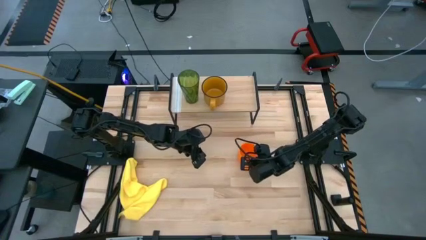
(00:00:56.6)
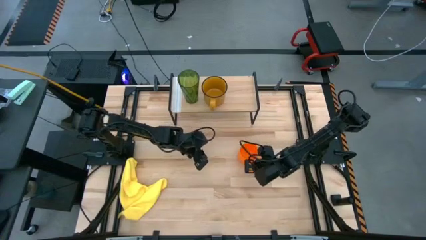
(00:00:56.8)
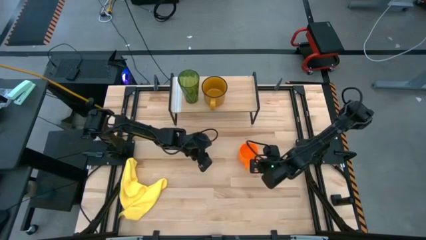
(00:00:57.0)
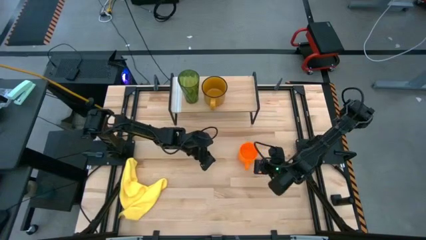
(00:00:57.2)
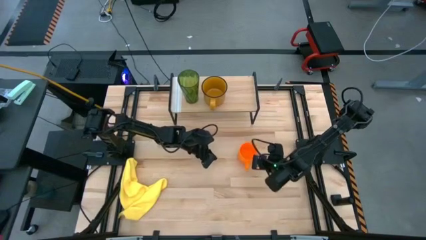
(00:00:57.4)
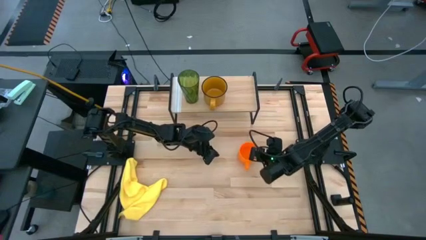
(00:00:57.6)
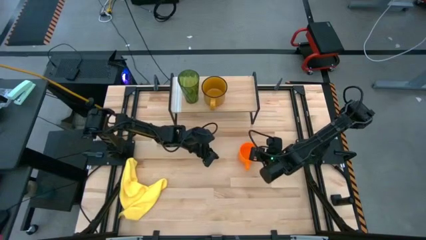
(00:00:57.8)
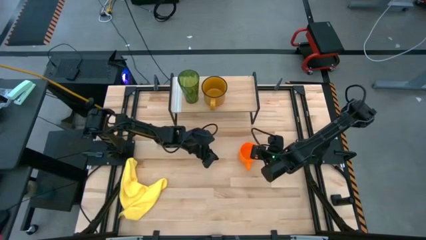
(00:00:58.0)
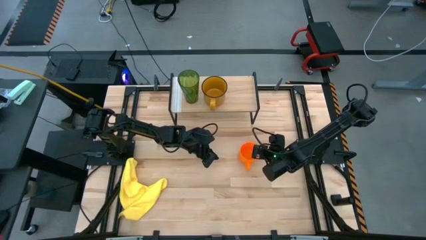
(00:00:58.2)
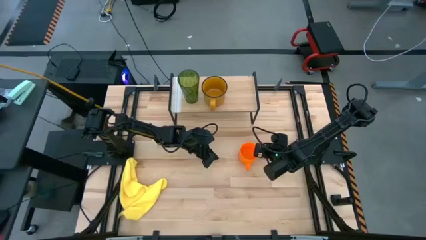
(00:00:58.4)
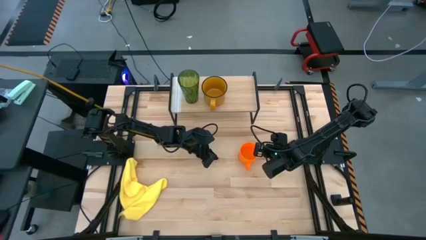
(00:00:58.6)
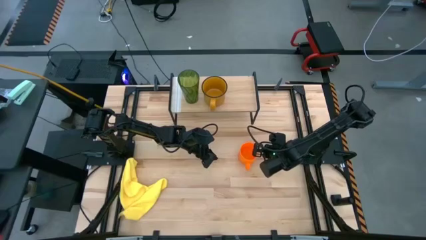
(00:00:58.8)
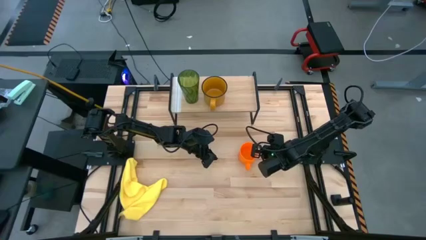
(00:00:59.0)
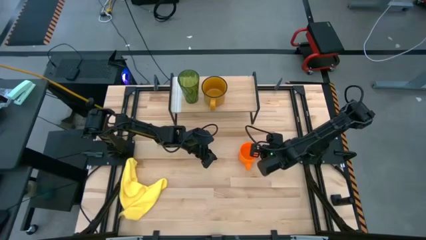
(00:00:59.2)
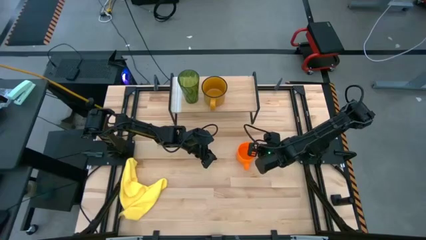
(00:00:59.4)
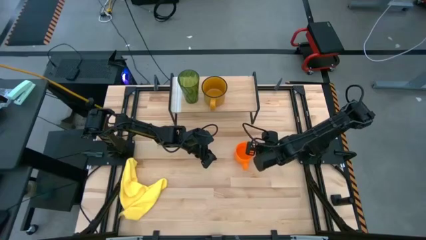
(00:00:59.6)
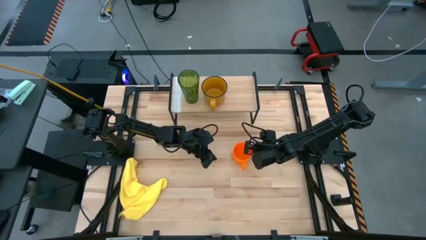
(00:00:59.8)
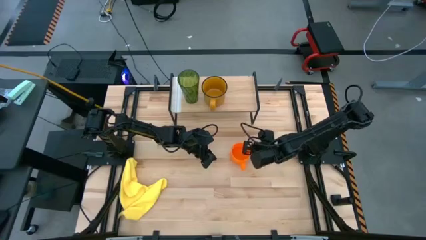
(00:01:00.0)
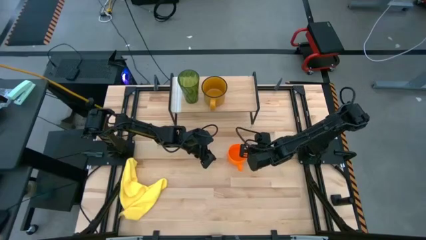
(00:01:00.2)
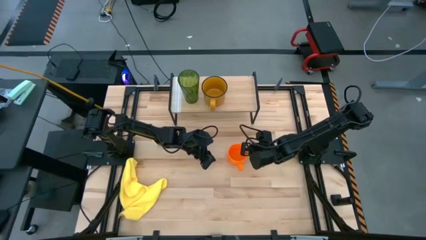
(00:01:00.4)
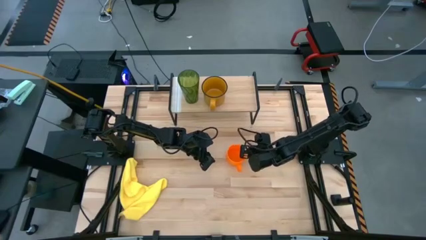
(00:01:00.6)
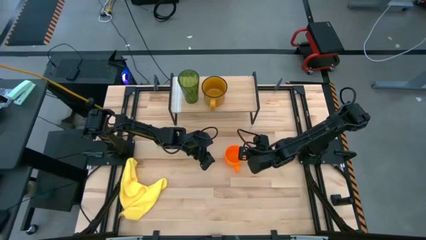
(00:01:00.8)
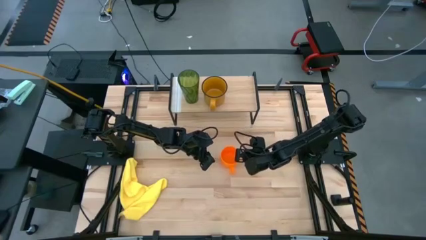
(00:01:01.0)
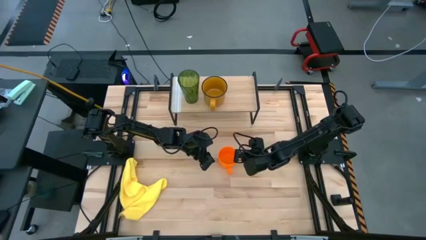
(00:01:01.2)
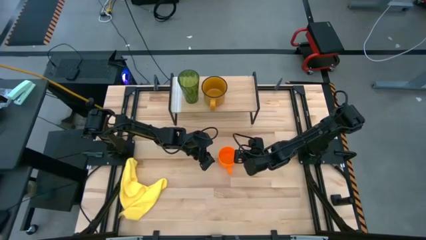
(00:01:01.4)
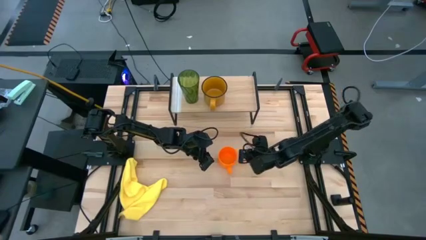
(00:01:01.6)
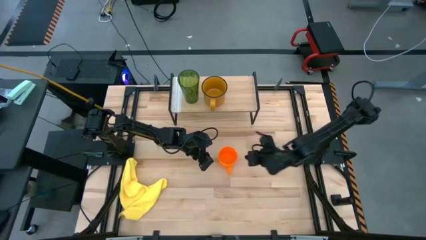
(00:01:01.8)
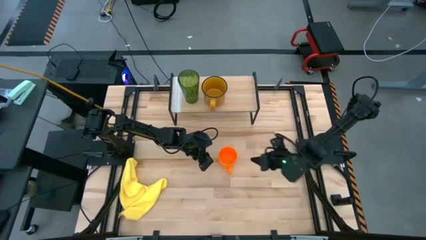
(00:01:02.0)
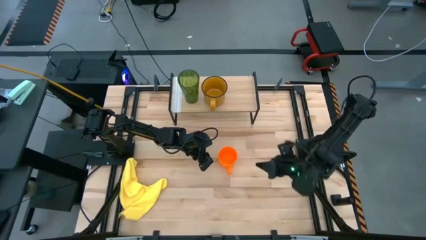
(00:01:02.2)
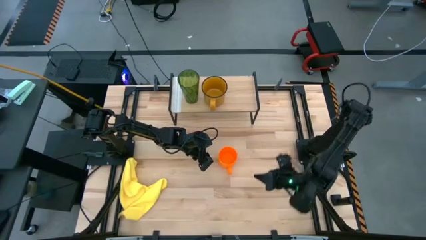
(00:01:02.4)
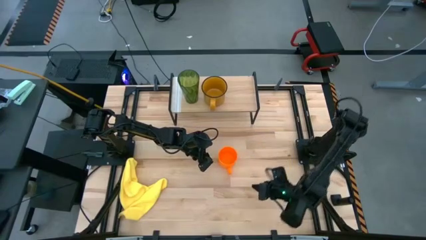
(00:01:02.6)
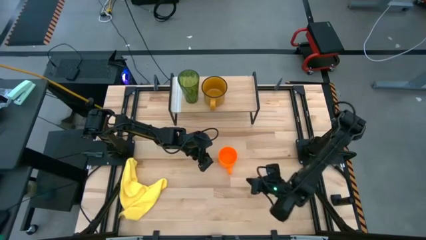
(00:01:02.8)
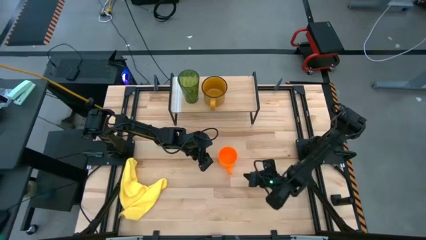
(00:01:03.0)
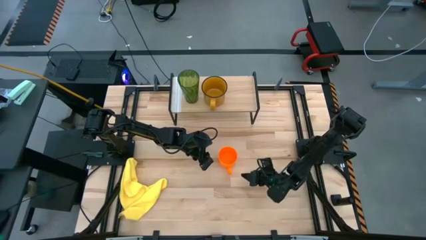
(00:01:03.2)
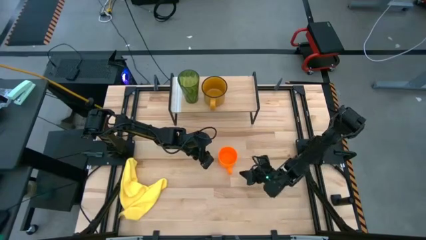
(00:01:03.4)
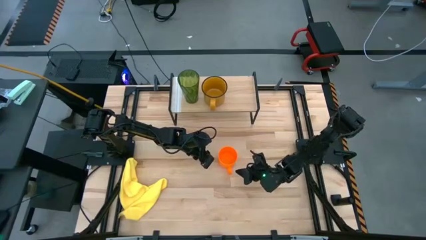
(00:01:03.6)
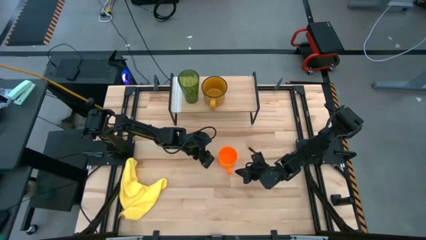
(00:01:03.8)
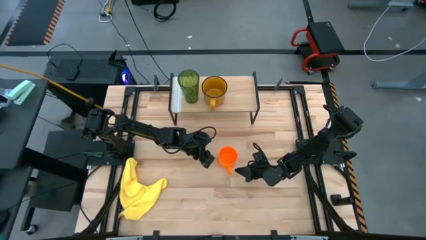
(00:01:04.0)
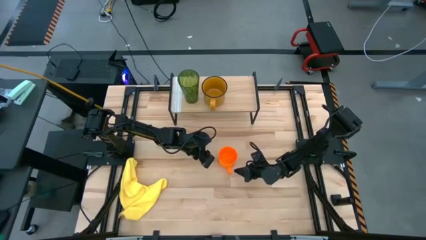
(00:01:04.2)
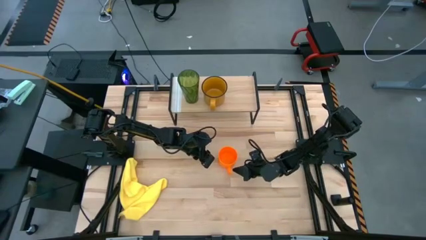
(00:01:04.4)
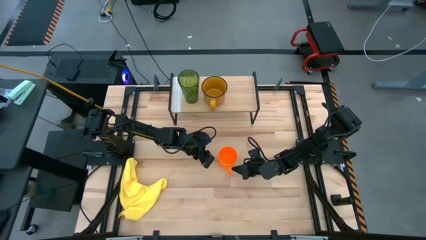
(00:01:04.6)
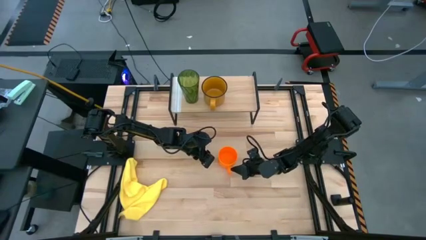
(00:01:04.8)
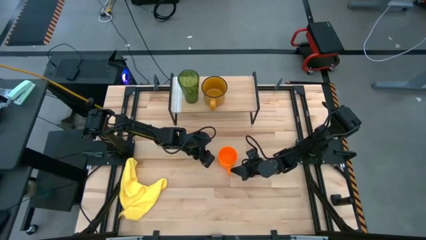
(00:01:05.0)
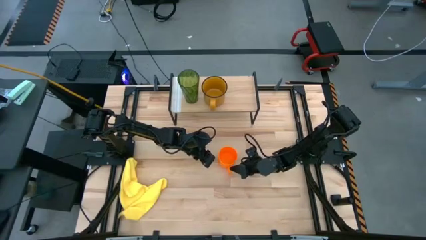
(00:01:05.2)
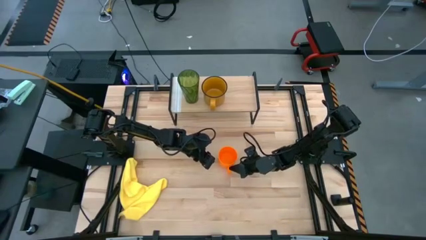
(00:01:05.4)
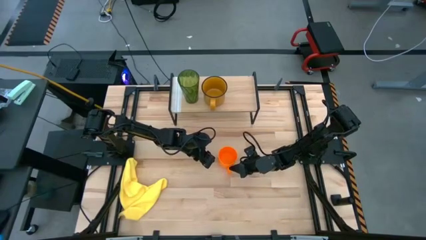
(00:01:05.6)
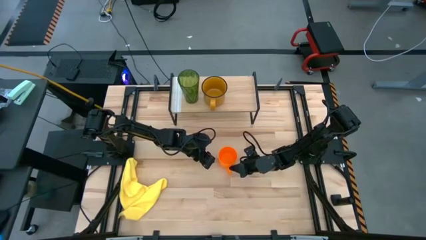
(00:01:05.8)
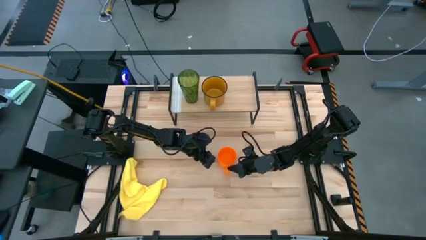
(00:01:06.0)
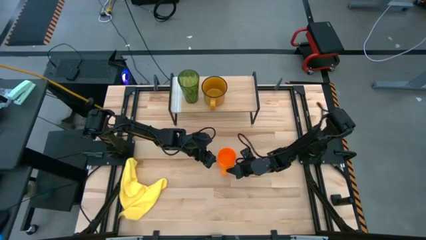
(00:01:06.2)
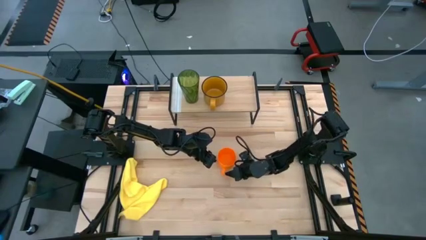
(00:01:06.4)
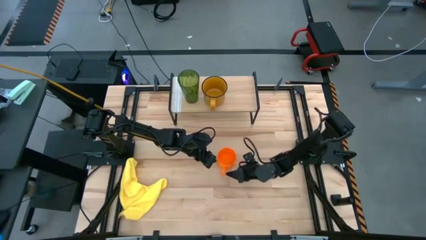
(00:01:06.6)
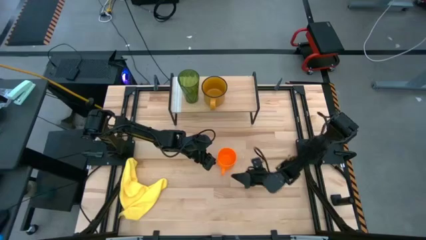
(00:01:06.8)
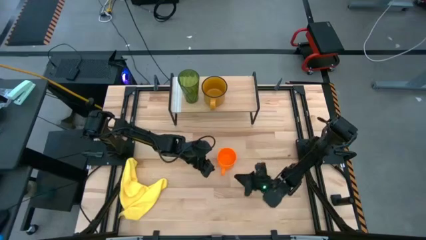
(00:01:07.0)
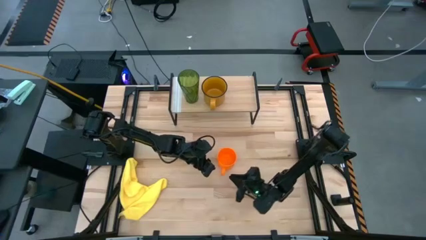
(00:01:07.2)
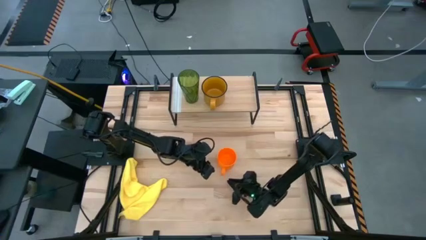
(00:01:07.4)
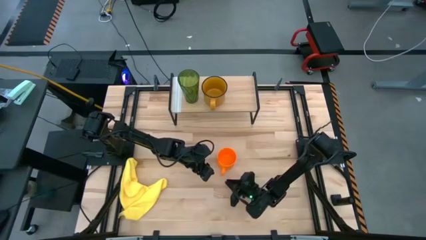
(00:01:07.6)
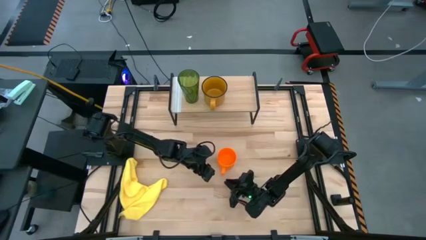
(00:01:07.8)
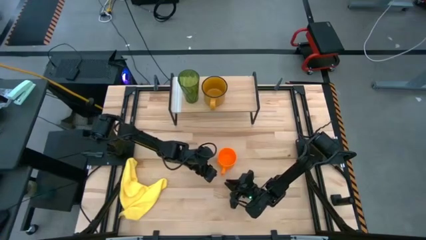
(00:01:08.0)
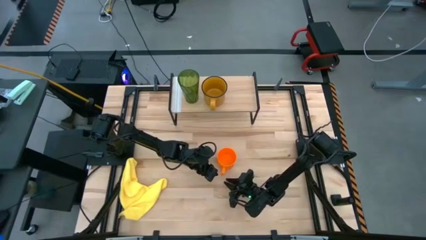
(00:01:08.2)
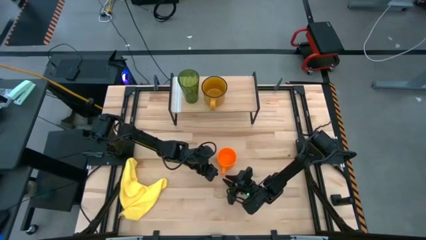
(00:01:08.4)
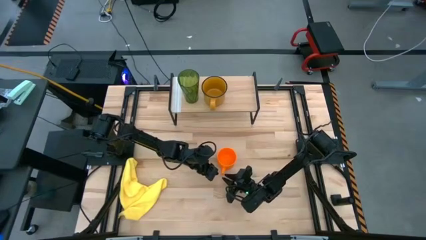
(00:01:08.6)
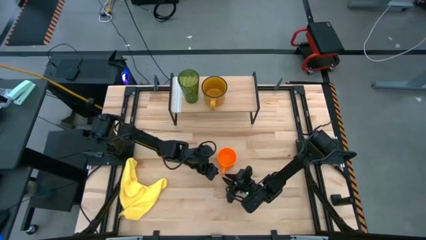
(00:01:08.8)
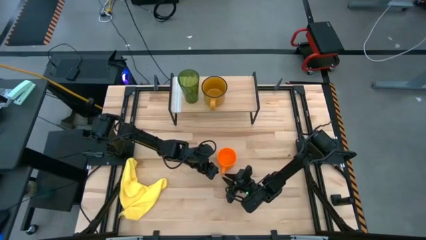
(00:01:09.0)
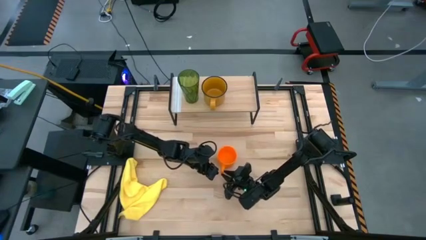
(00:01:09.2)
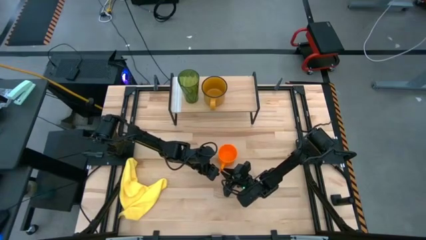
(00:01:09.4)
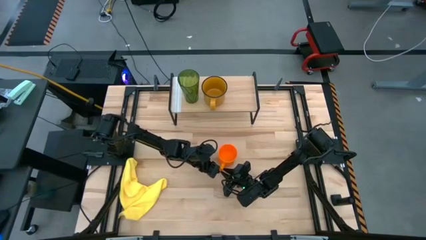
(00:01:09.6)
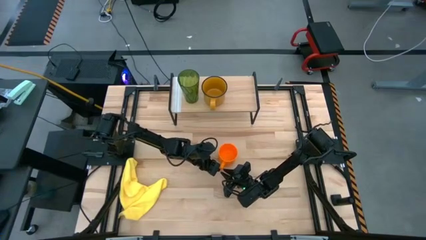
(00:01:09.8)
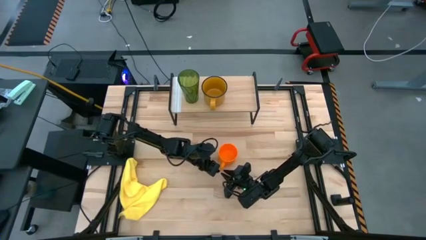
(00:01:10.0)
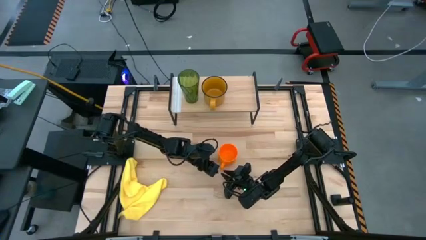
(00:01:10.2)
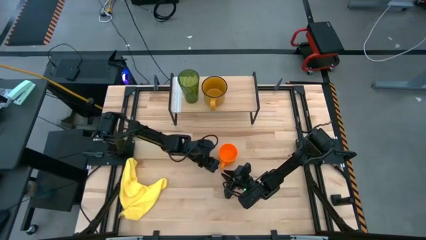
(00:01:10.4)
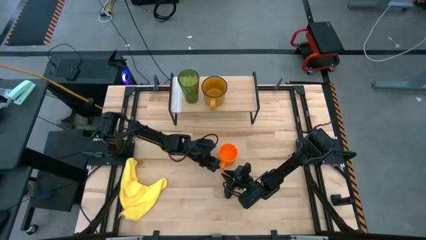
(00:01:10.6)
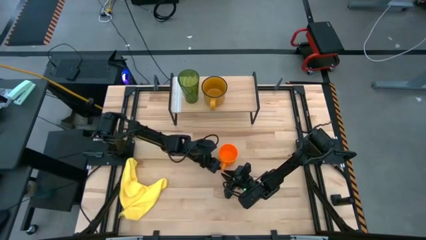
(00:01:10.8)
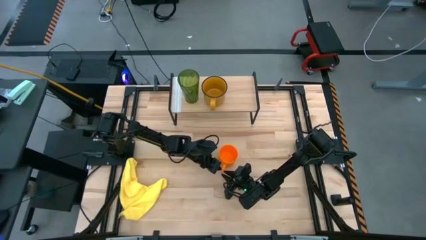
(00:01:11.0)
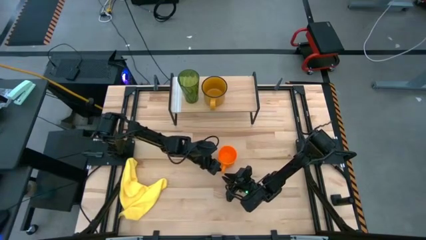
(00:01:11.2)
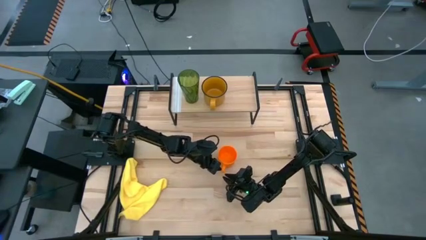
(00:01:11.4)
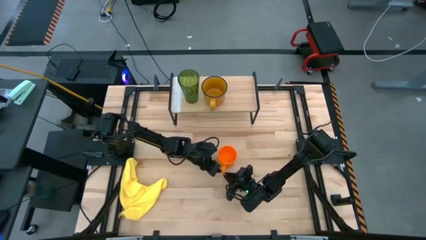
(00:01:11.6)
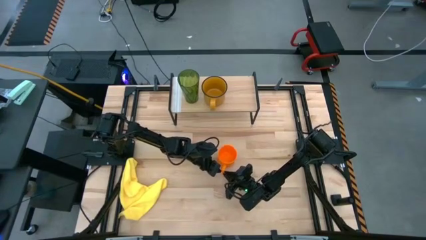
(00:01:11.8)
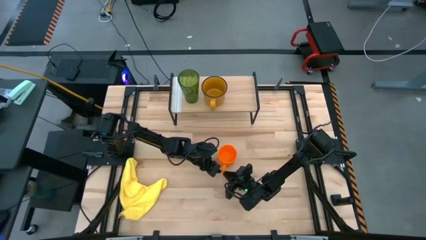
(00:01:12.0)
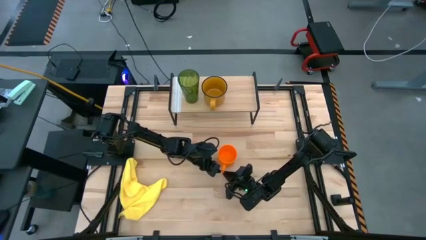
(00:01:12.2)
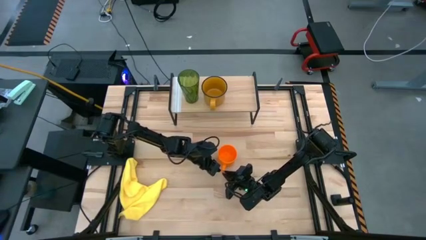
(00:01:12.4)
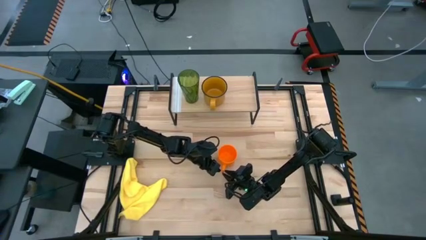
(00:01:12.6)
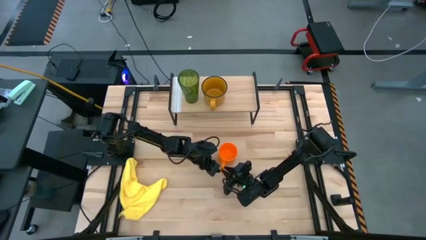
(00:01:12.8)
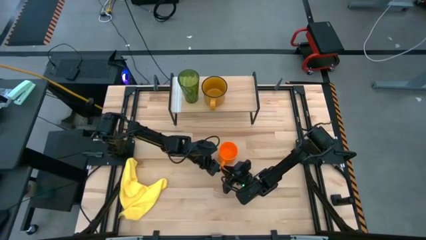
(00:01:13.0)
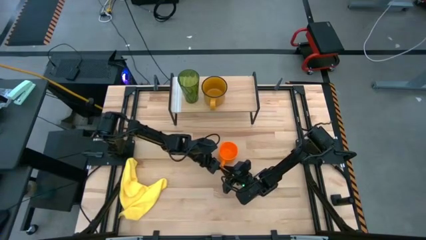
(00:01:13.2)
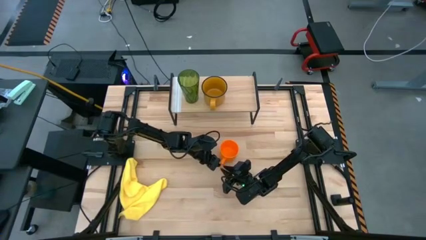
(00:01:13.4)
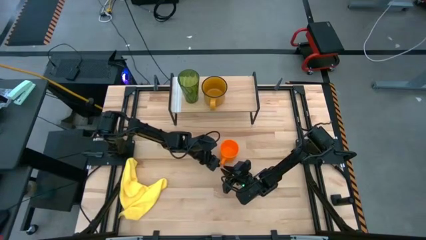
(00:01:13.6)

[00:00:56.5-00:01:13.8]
Task: Stack small to large cups/mugs on shelf
Put the orange mug on the shelf
